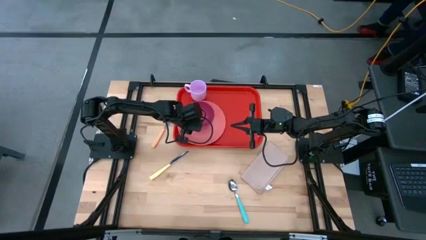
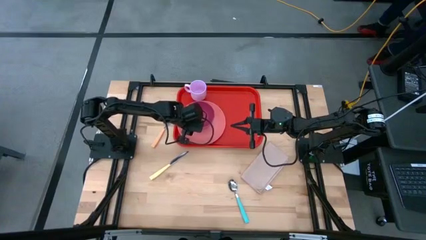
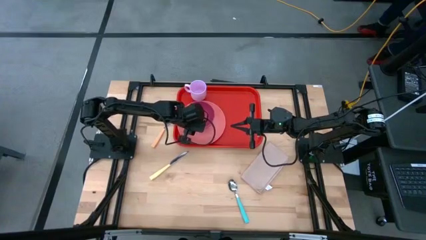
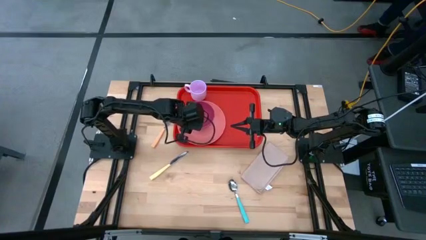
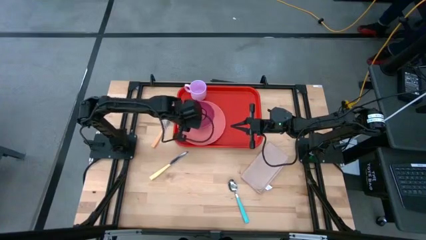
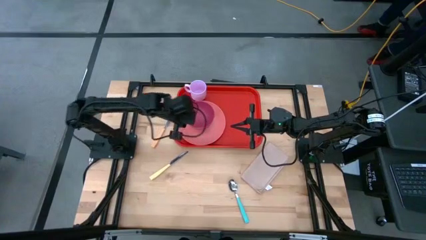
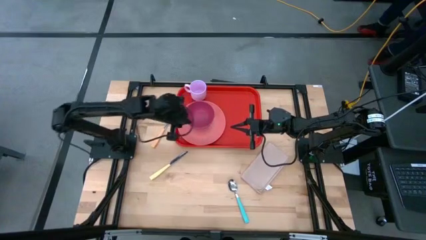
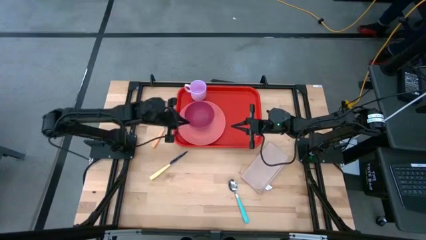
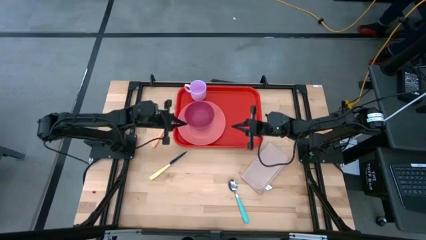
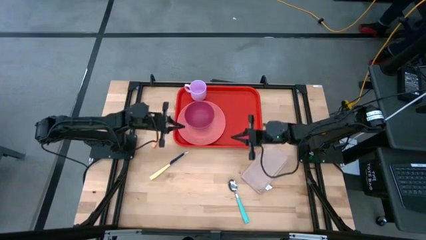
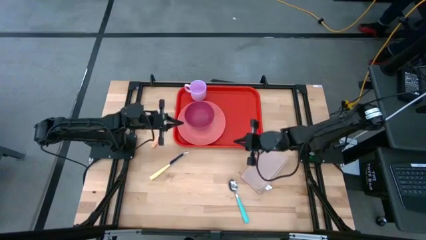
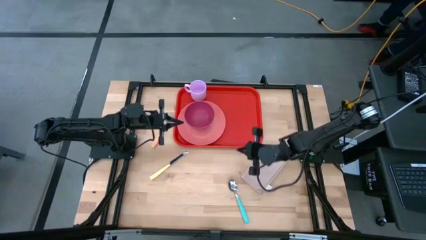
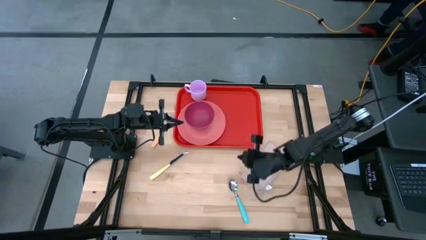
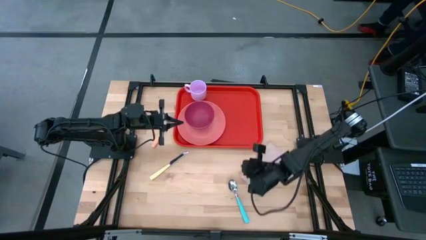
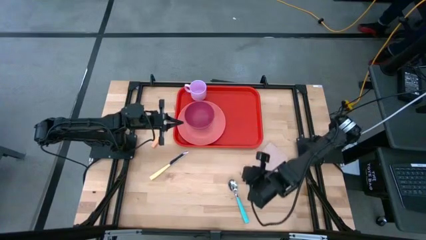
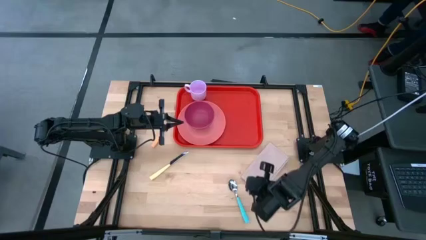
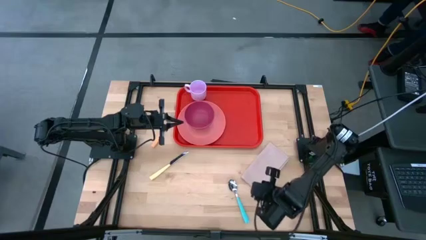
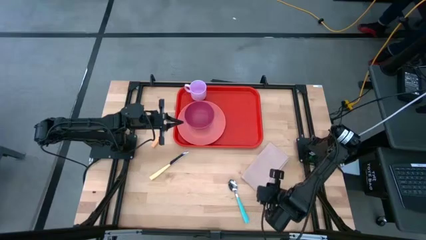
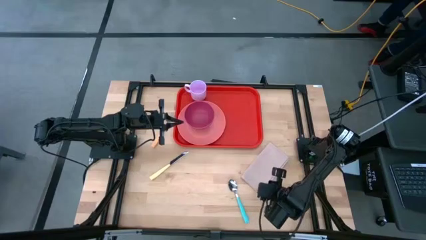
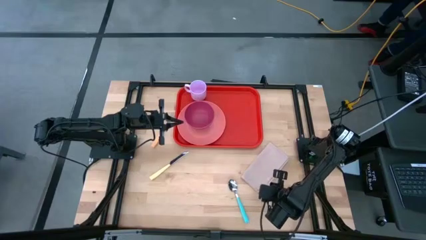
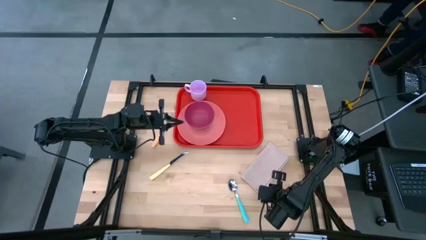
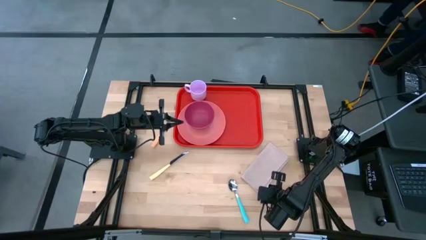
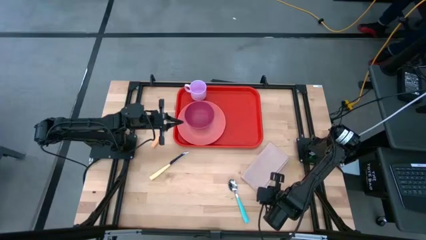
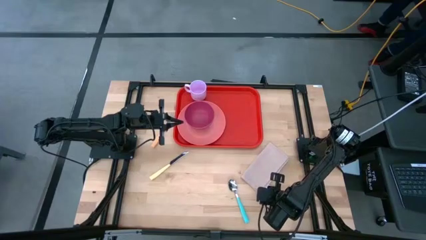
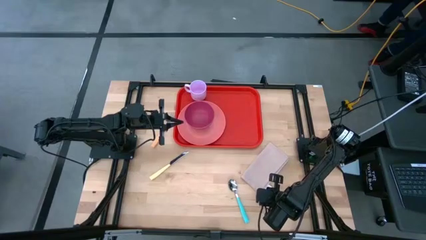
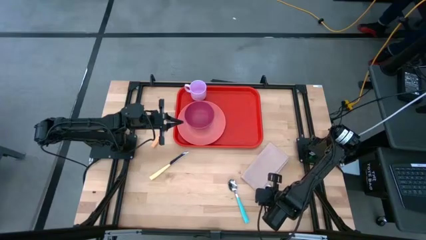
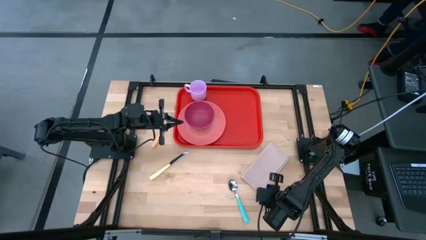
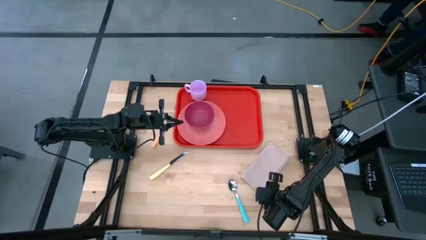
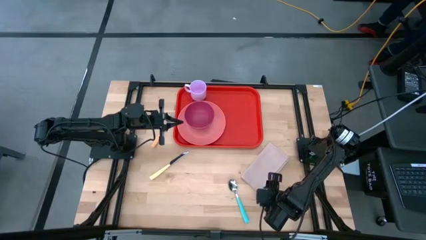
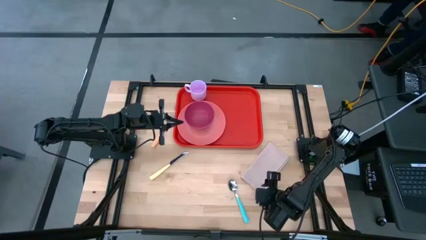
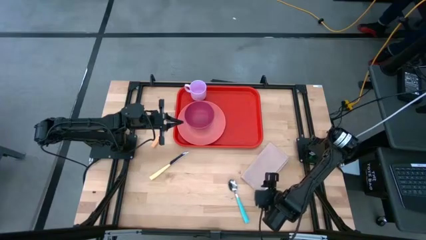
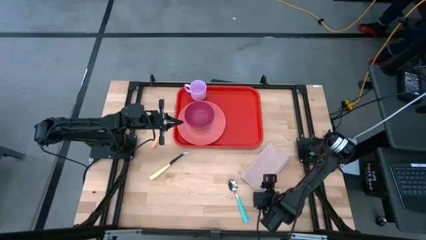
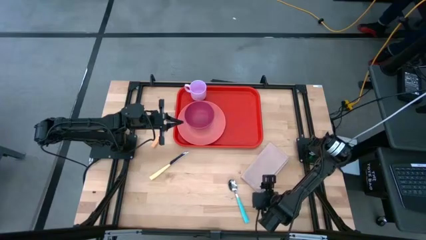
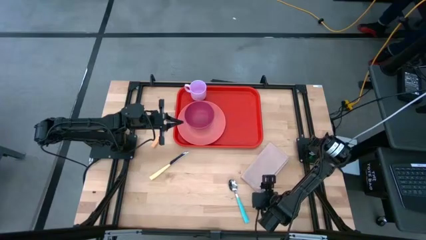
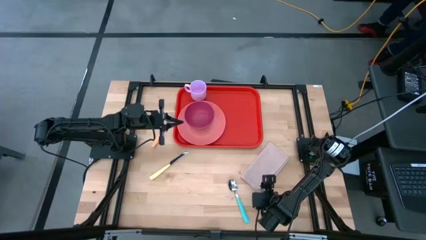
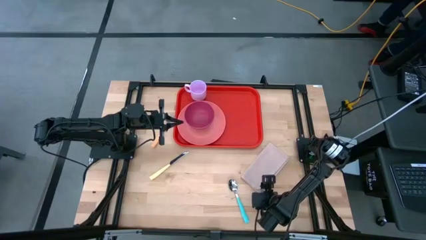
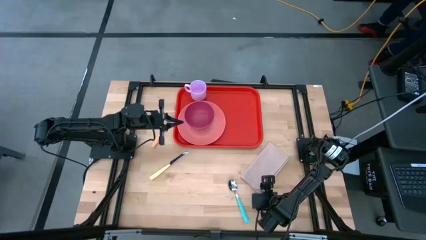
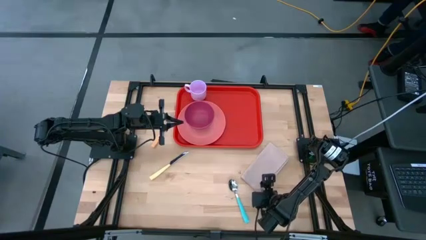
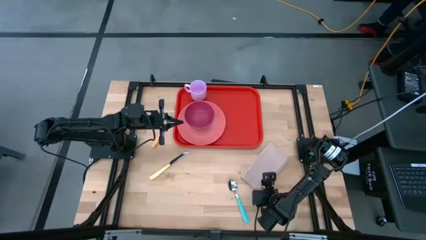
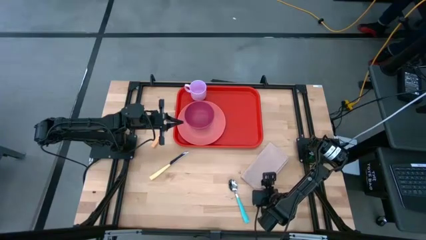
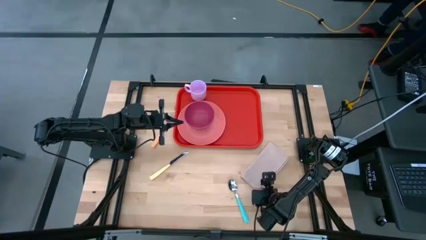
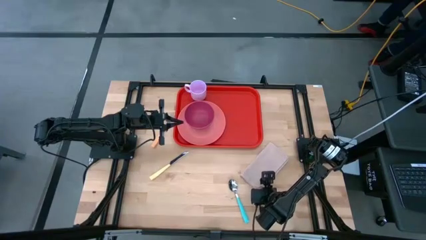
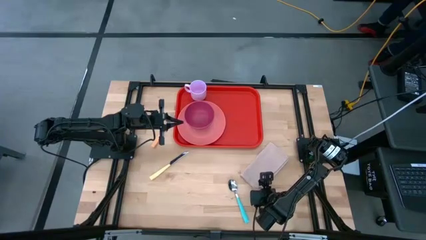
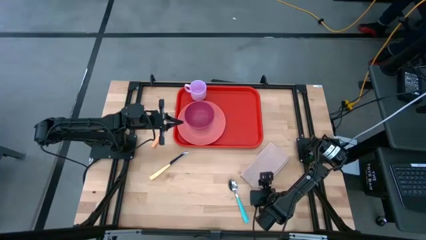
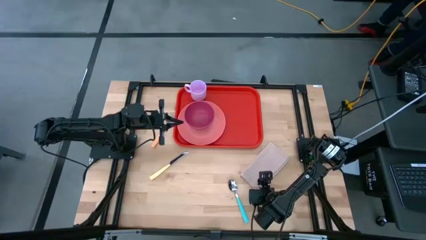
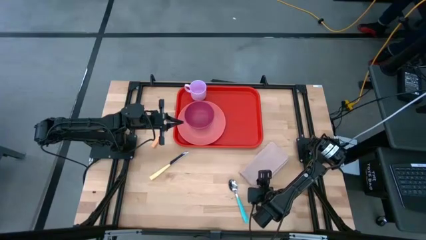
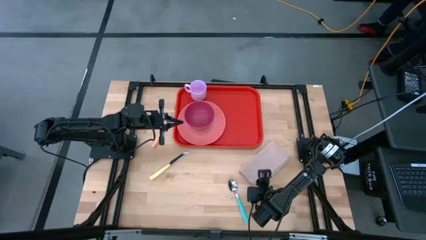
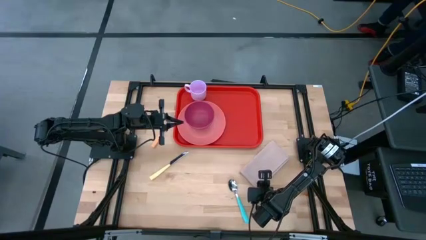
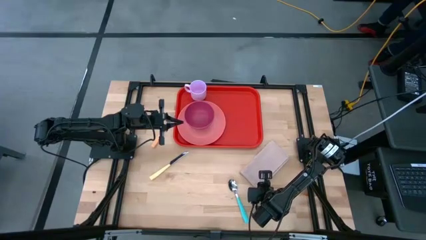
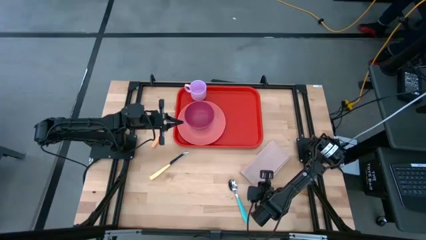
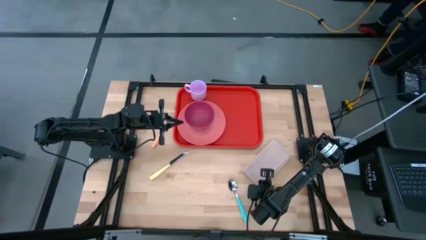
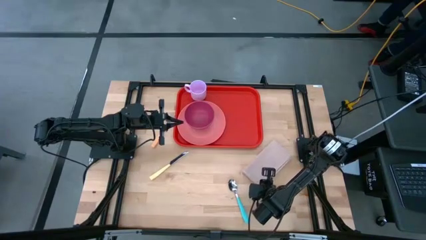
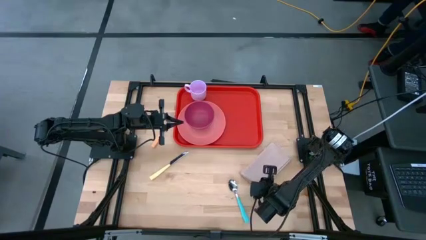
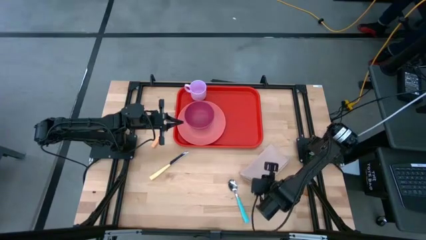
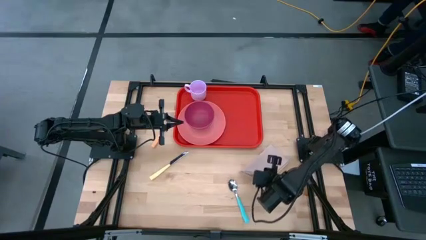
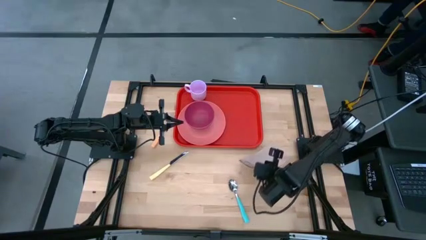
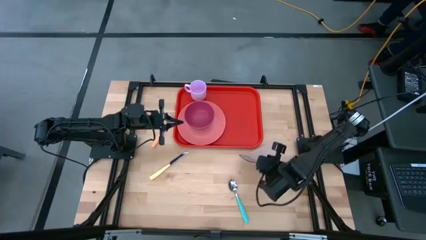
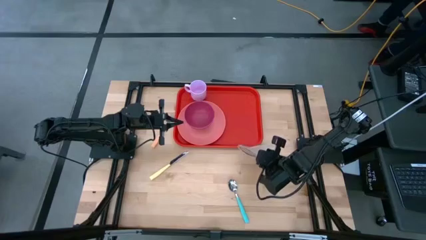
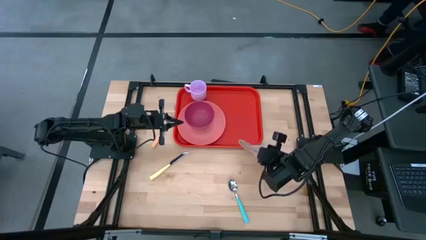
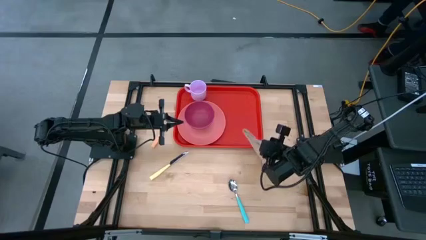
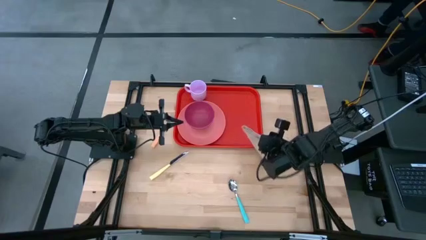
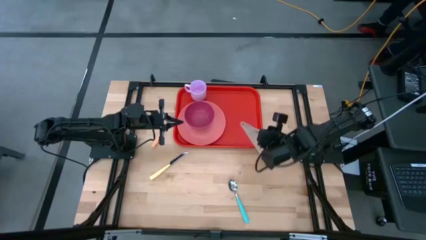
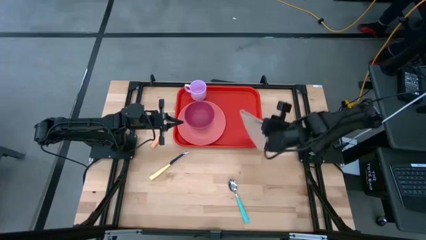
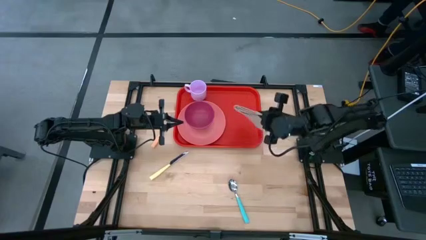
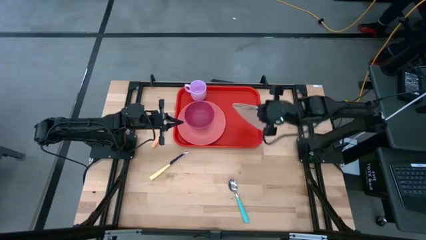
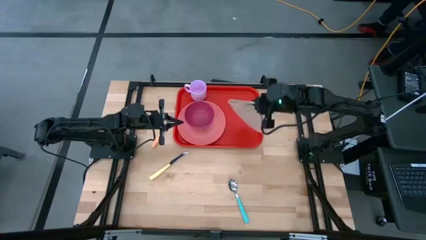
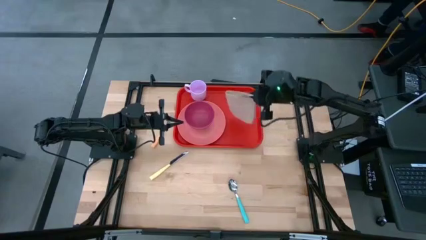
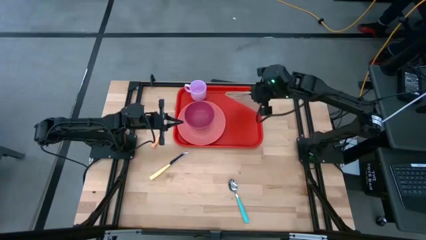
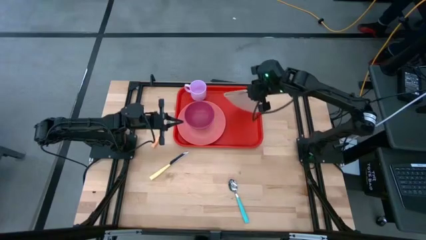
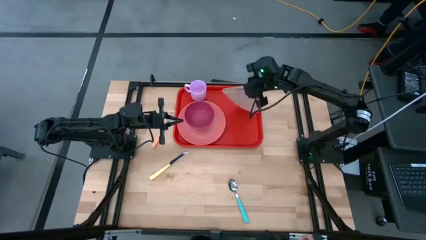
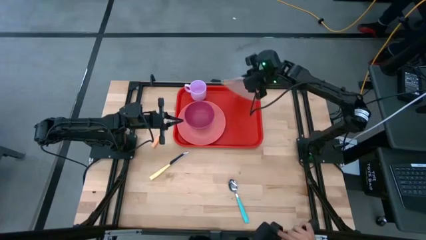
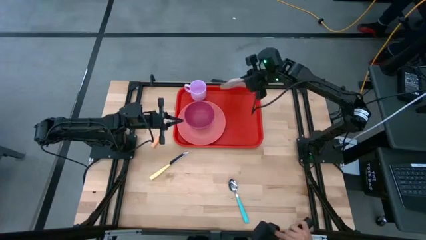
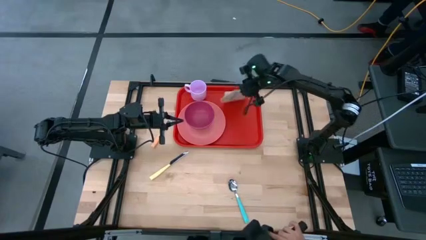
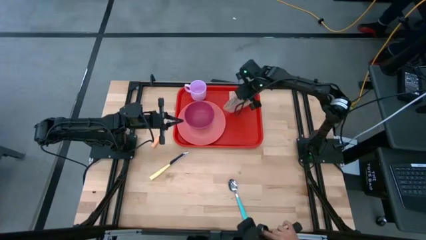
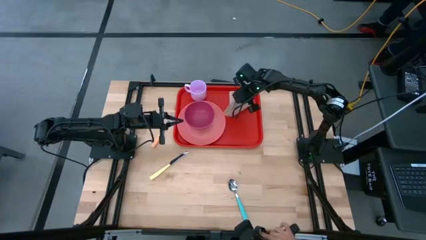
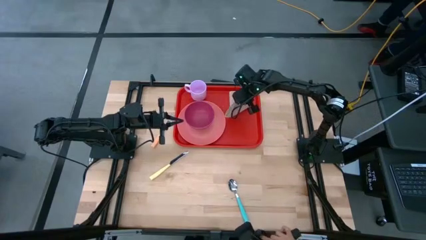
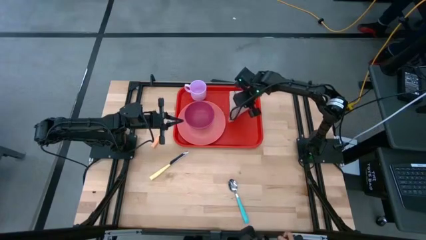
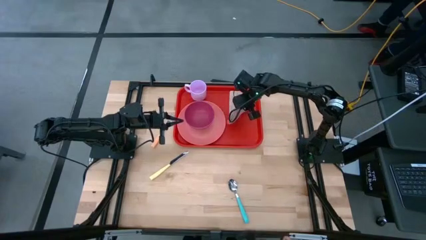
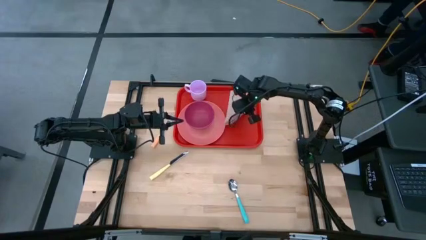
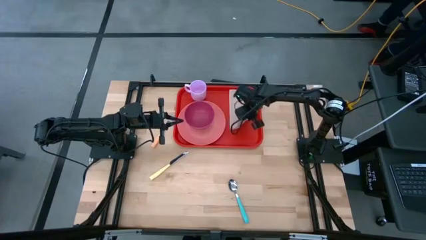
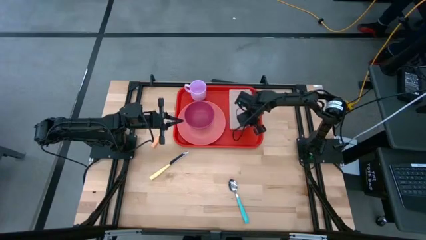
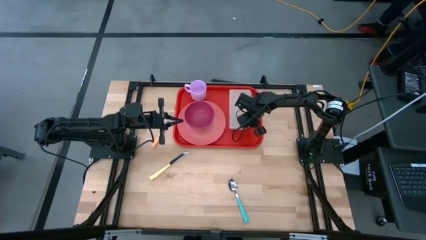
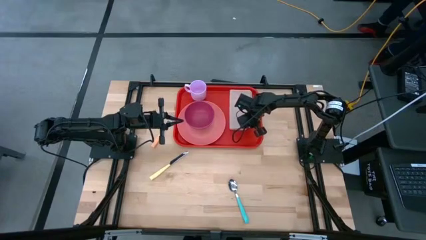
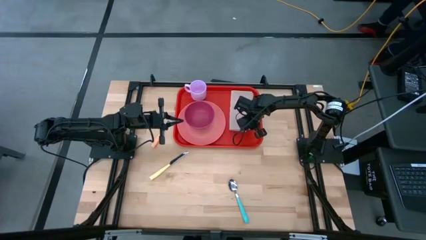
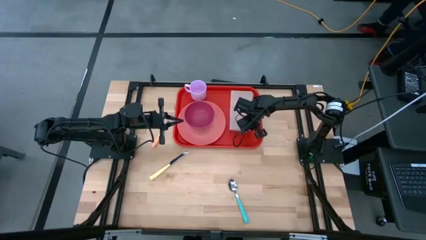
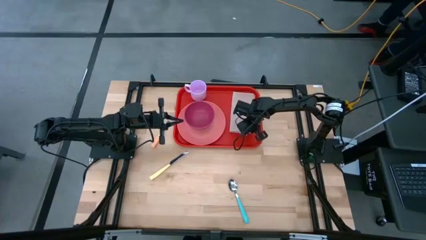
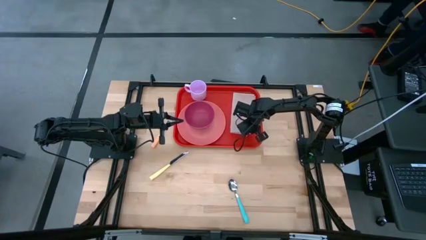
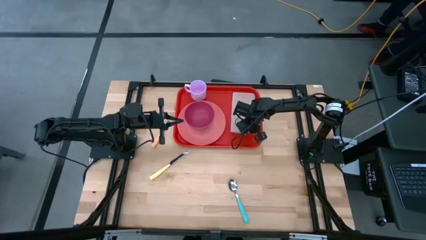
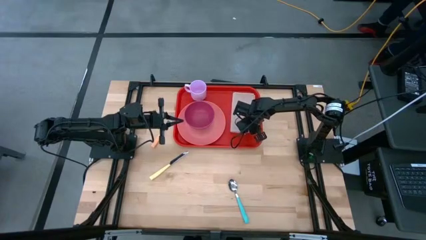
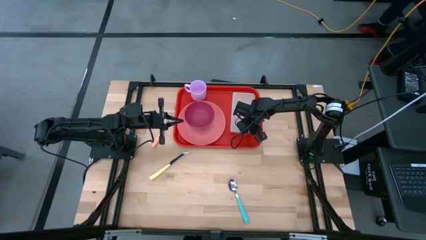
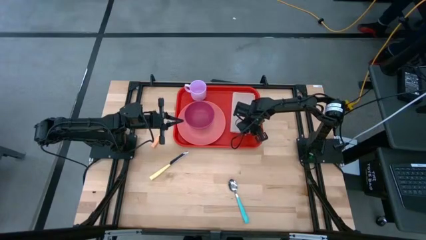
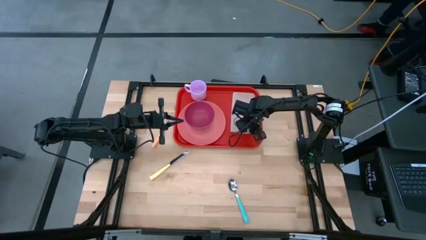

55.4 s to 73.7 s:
Task: Set up tray
Put the light brown napkin on the red tray
